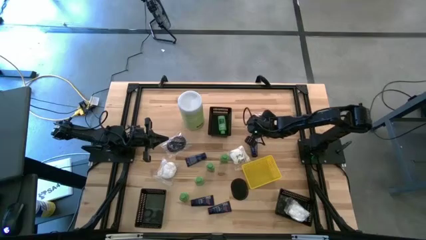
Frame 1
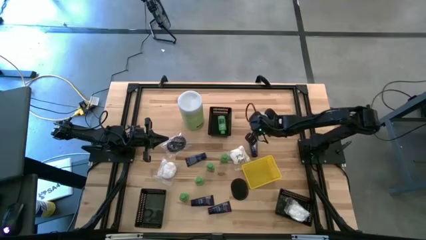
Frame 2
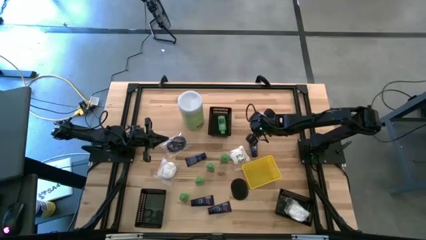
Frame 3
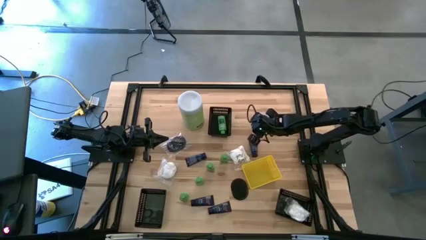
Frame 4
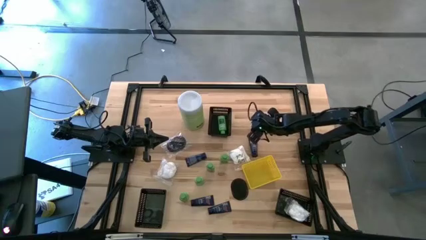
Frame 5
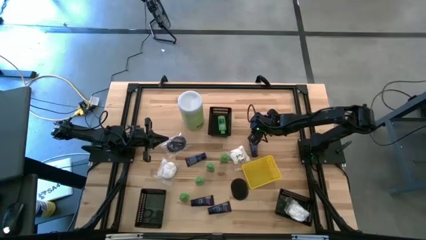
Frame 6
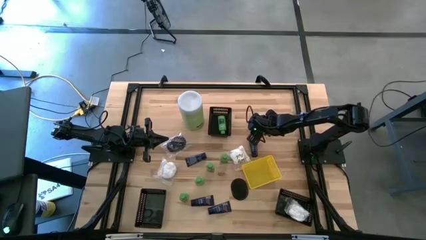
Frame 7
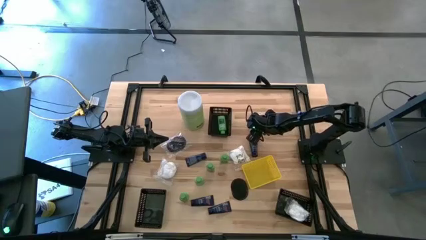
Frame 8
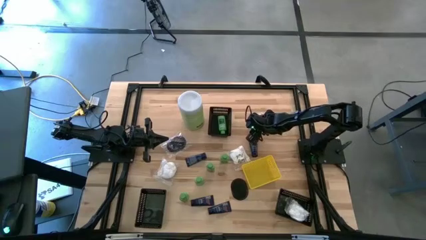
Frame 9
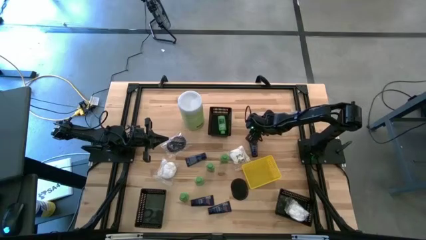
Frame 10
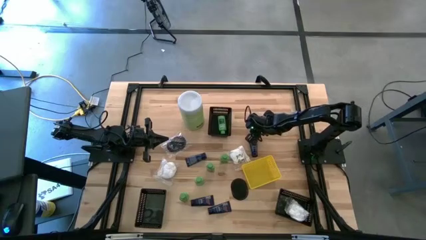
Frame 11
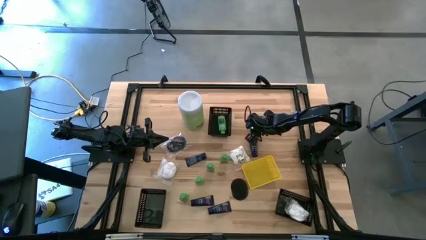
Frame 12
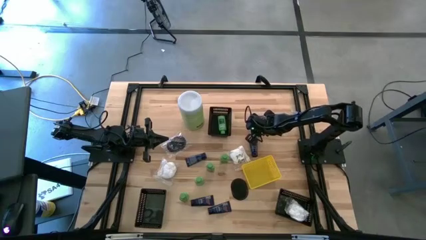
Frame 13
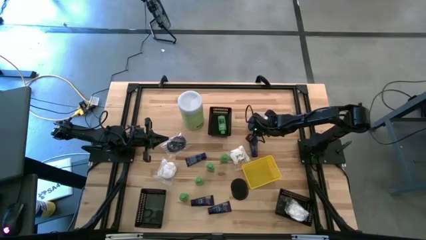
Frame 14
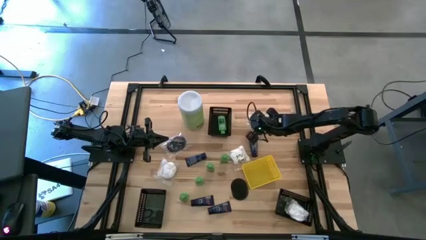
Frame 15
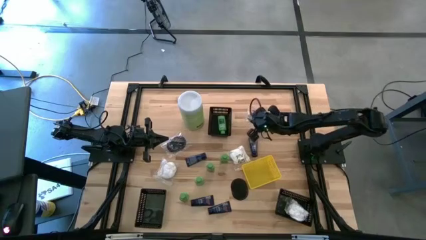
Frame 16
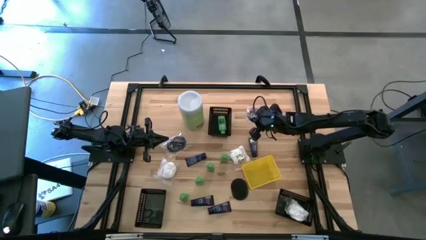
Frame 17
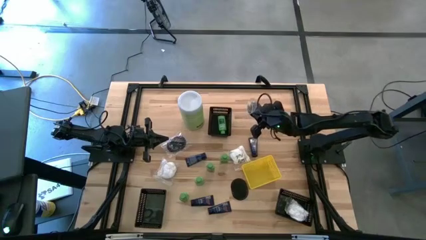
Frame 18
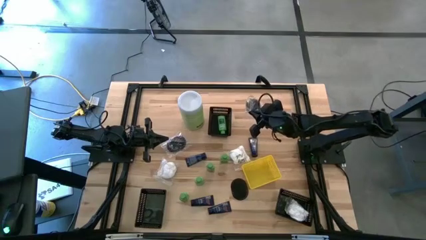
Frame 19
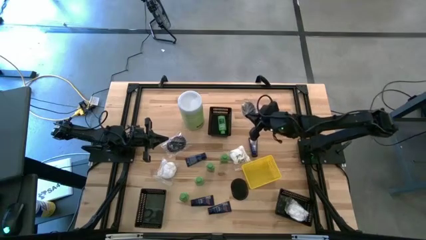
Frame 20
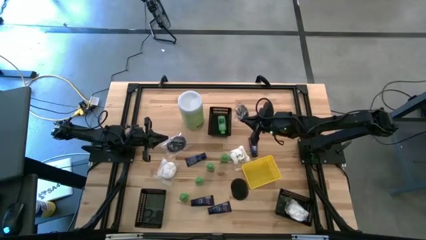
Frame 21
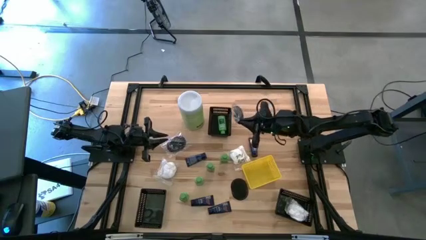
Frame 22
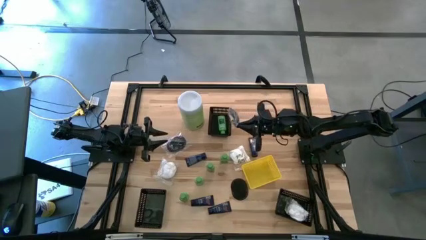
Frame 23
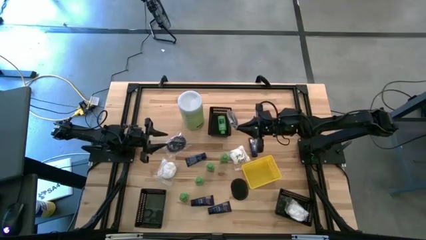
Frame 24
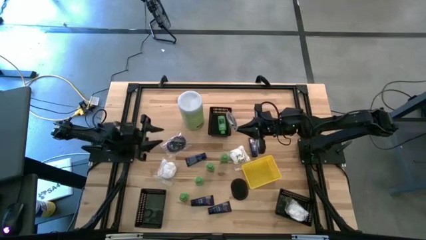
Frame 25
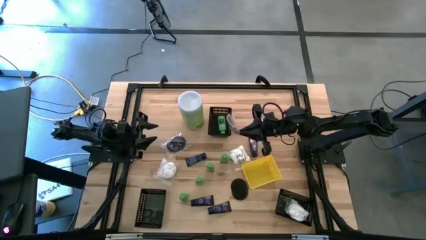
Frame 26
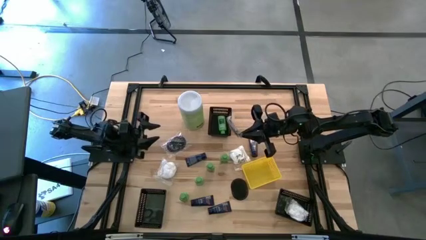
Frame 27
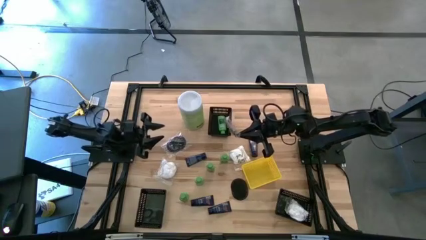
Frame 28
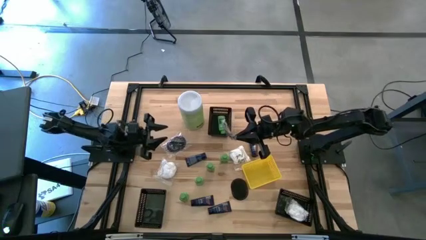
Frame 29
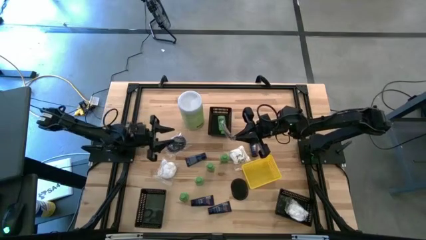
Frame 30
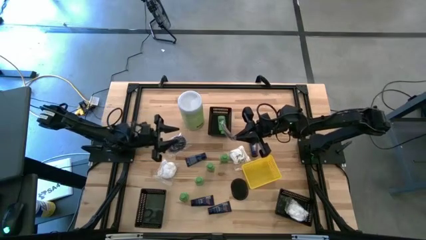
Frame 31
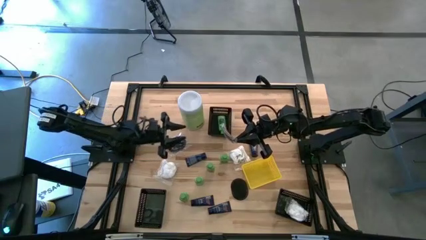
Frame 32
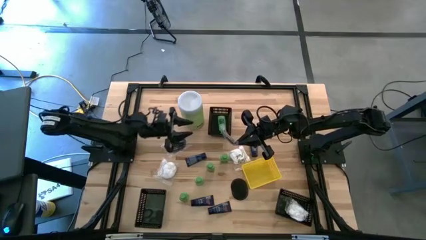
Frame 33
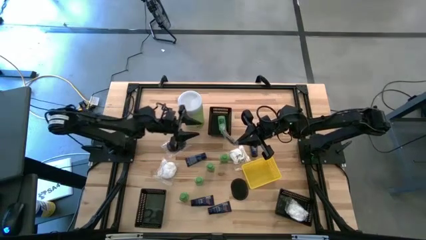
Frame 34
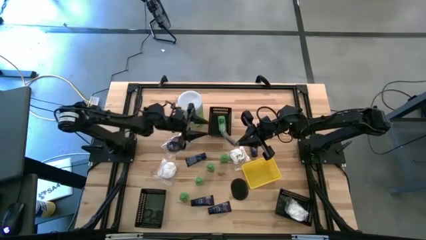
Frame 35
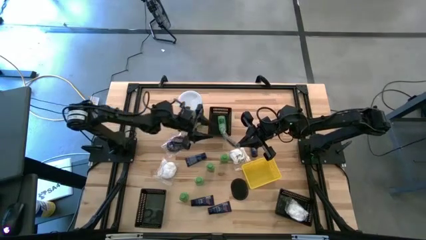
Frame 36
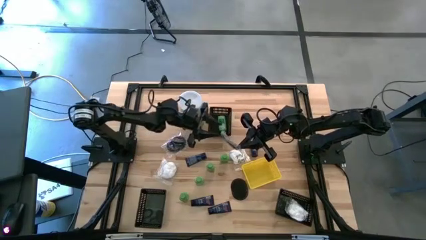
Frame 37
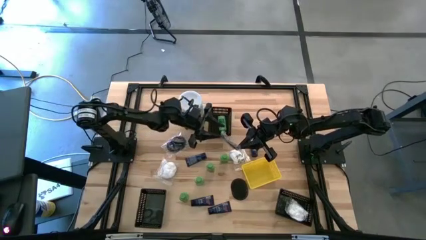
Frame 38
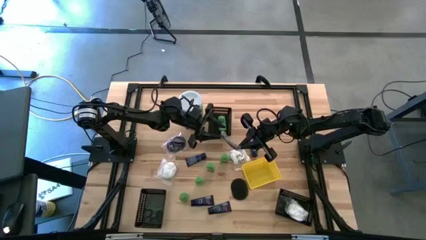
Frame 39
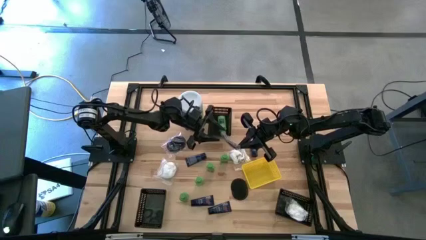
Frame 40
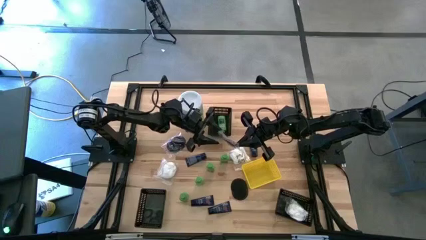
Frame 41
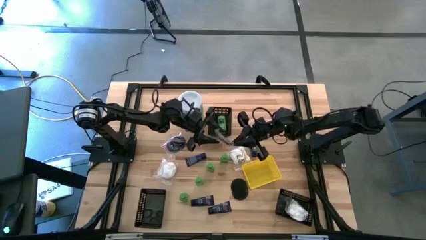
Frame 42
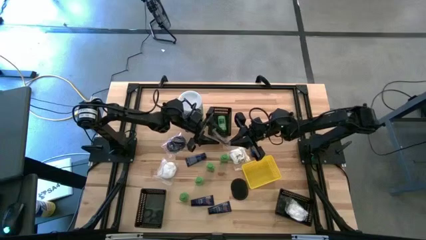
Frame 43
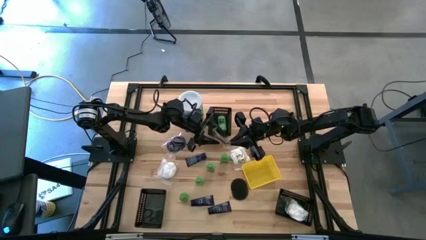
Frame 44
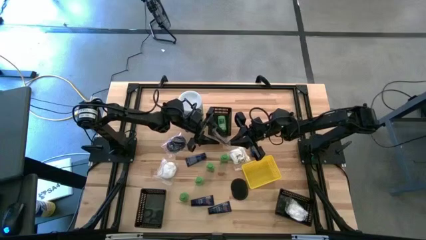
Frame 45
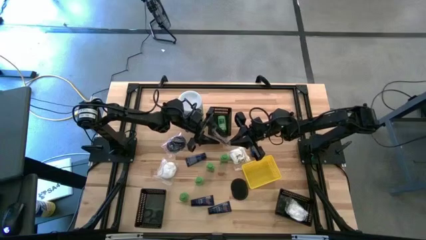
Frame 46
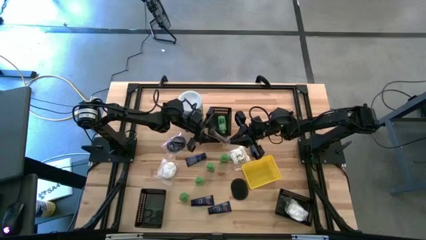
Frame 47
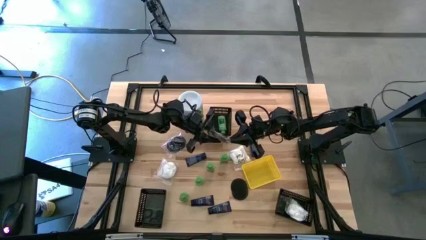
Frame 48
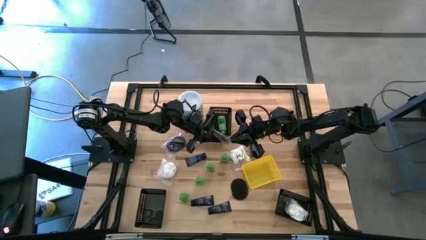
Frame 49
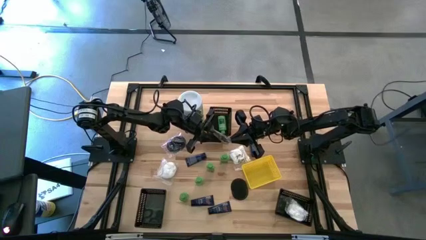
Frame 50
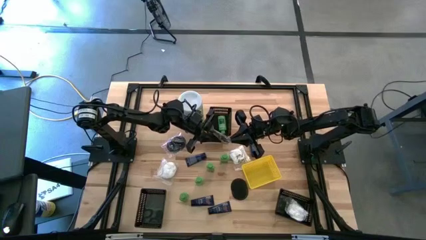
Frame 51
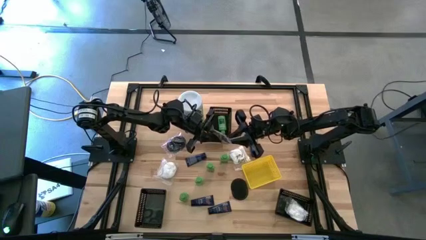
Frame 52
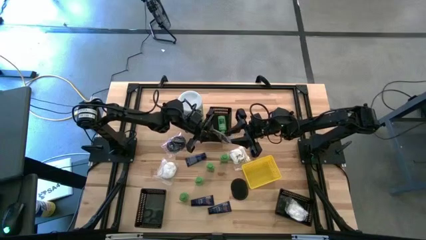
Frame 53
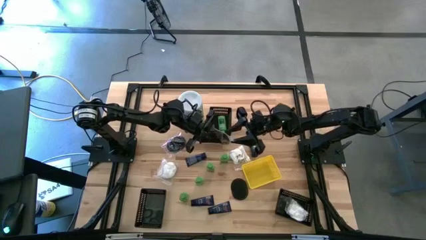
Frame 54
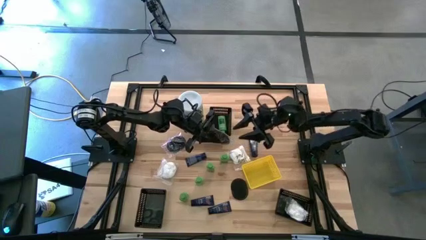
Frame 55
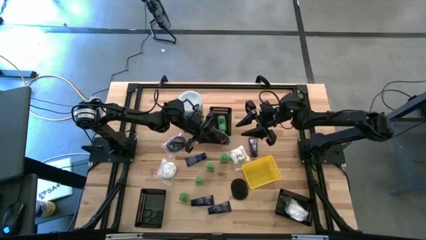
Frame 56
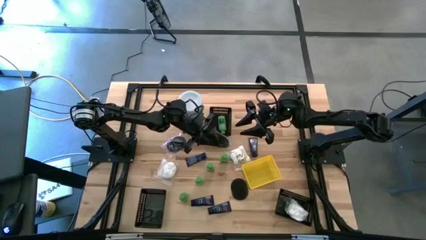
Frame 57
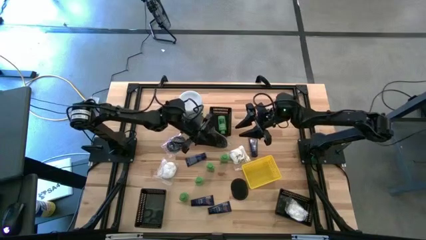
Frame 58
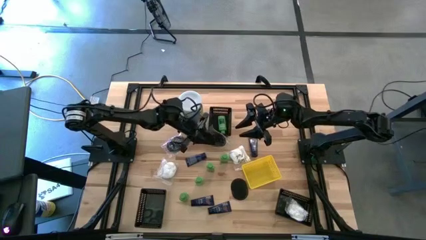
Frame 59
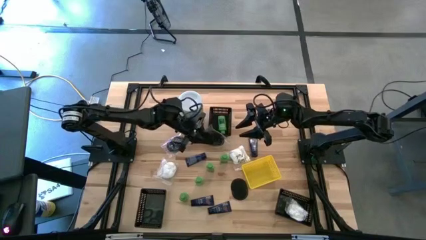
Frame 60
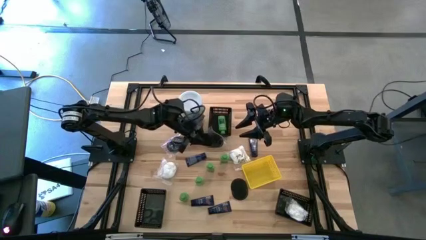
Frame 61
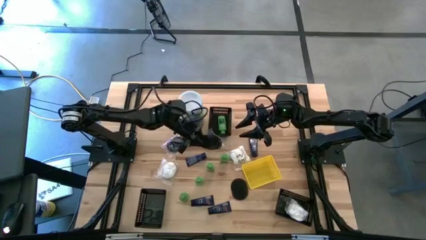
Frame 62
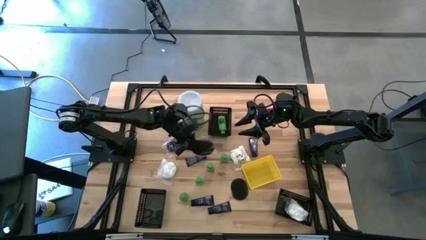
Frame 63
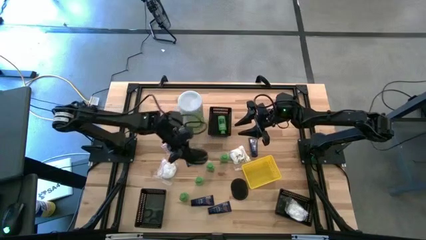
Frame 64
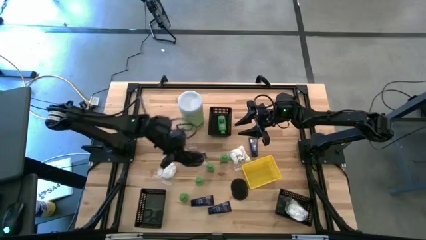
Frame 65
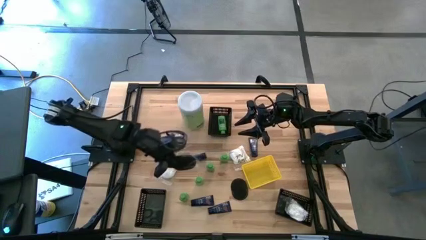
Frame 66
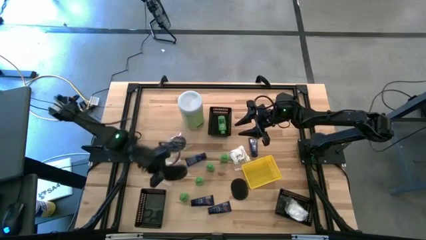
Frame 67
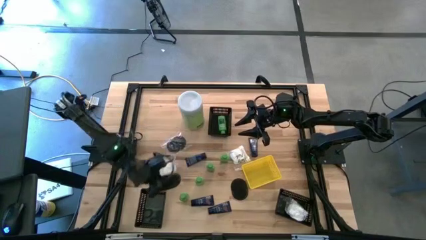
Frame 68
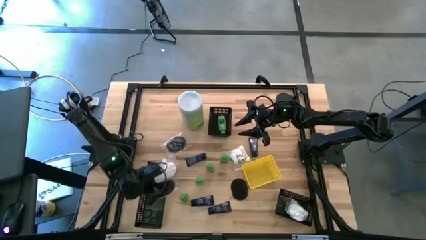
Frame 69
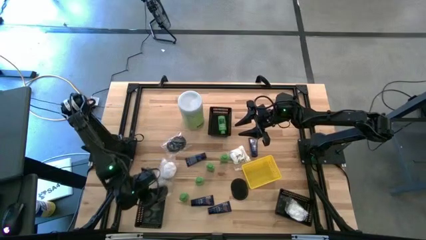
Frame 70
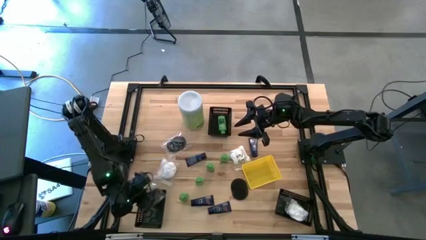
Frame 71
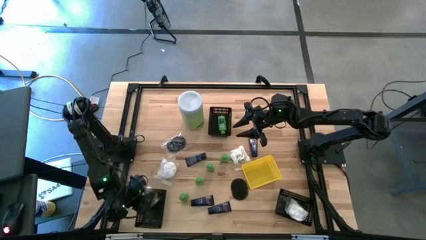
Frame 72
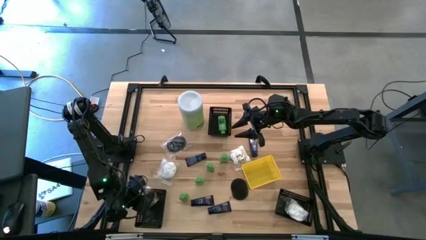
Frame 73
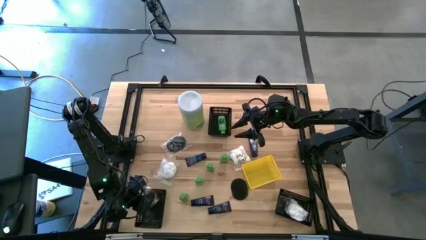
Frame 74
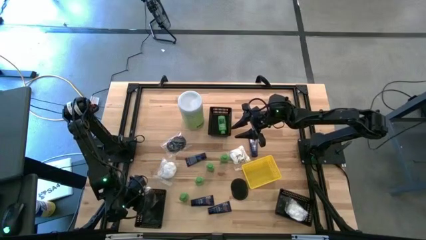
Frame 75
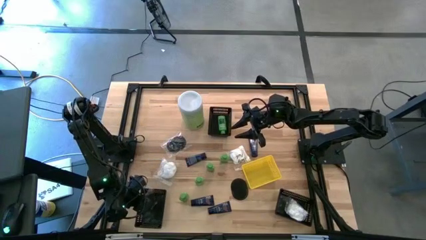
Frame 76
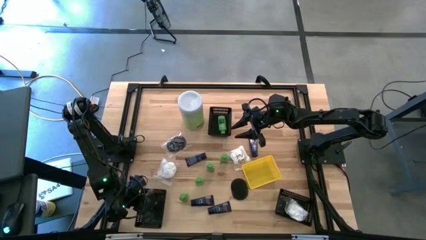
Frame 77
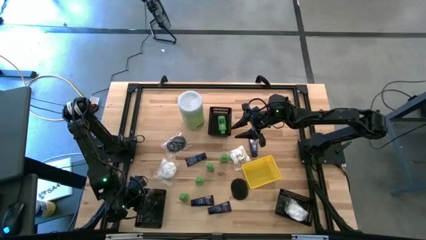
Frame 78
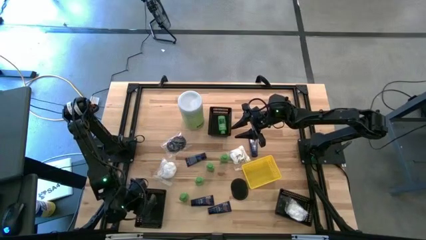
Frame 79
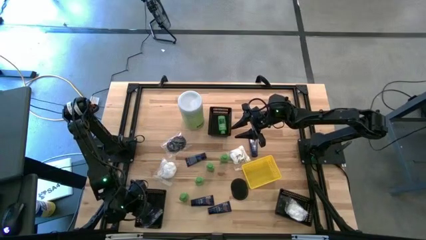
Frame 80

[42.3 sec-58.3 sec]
Task: Pick & Place Travel size toiletries
Put the black hair brush into the bottom left black bin
